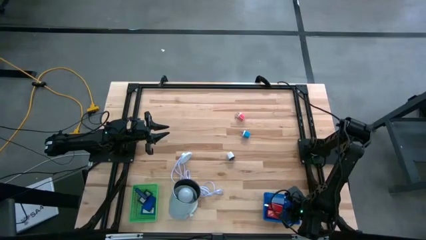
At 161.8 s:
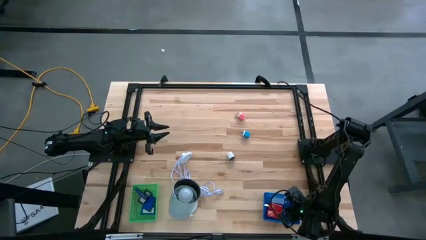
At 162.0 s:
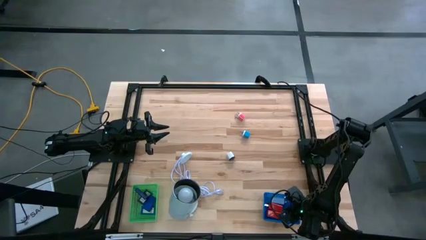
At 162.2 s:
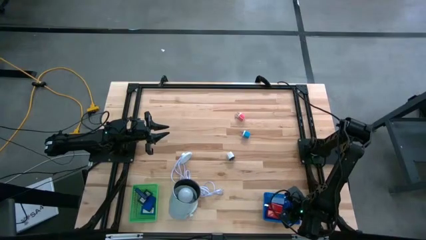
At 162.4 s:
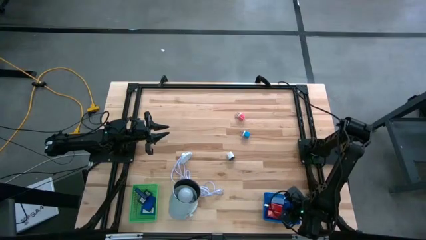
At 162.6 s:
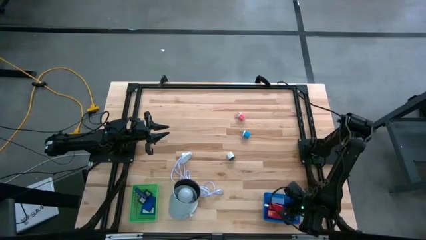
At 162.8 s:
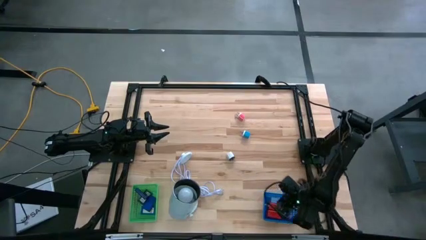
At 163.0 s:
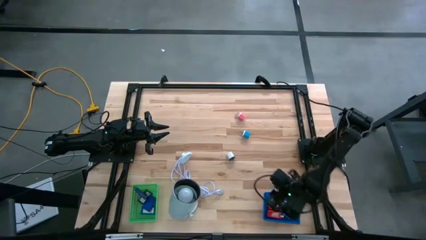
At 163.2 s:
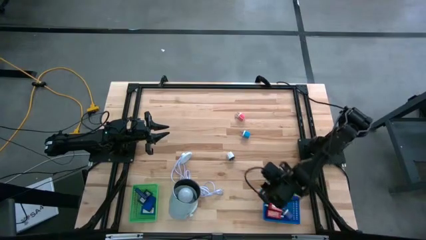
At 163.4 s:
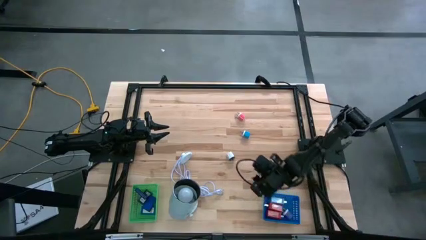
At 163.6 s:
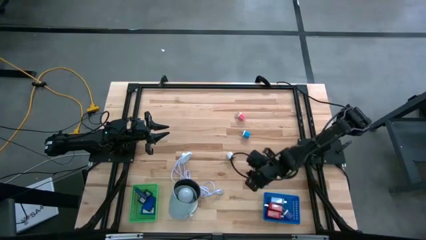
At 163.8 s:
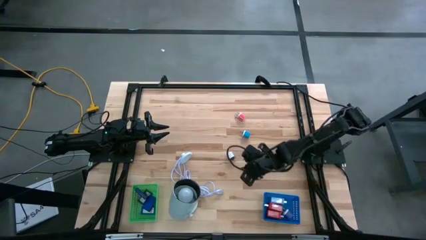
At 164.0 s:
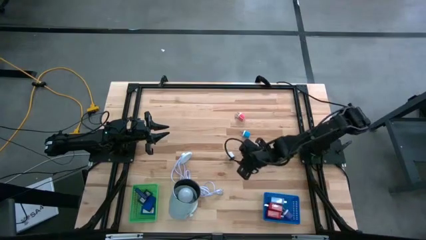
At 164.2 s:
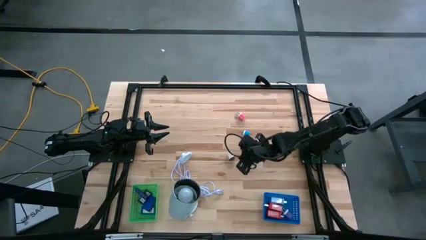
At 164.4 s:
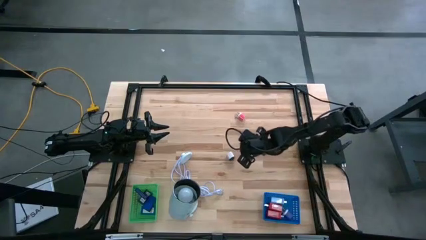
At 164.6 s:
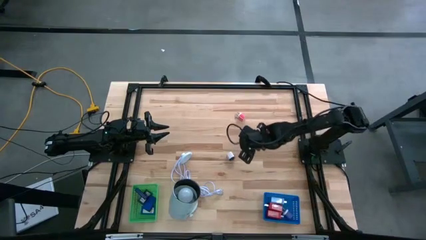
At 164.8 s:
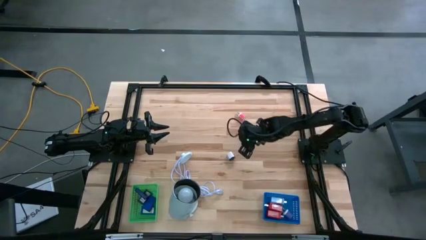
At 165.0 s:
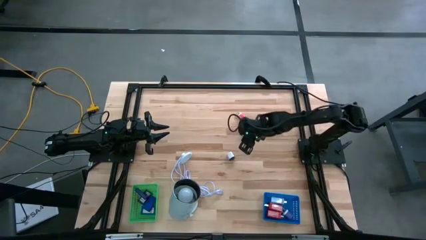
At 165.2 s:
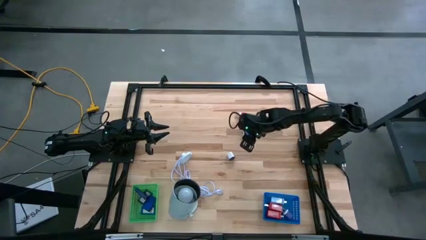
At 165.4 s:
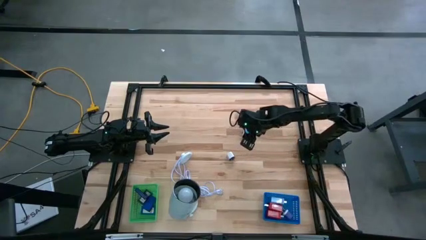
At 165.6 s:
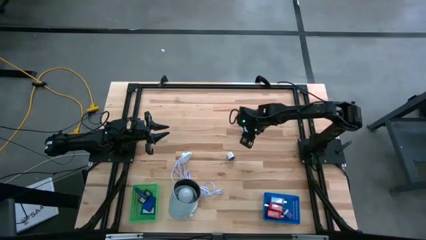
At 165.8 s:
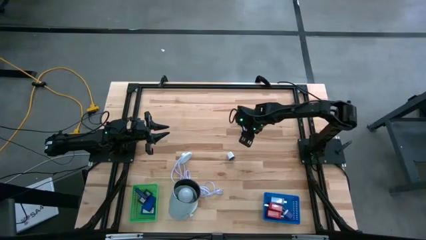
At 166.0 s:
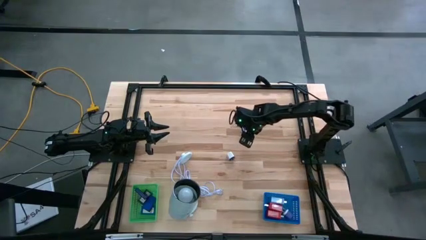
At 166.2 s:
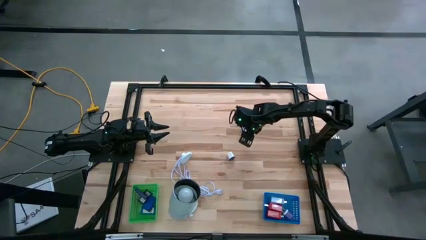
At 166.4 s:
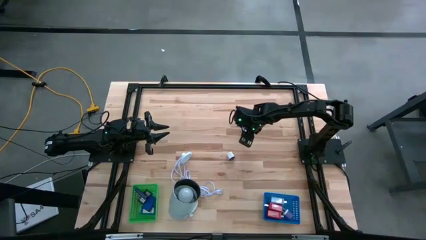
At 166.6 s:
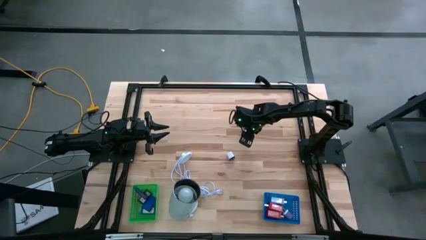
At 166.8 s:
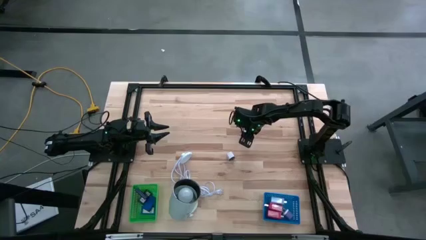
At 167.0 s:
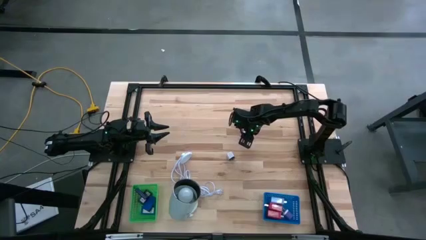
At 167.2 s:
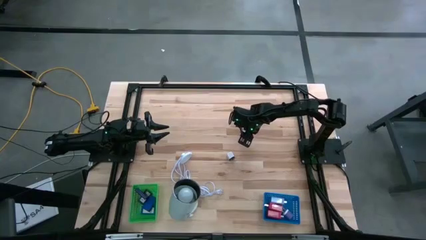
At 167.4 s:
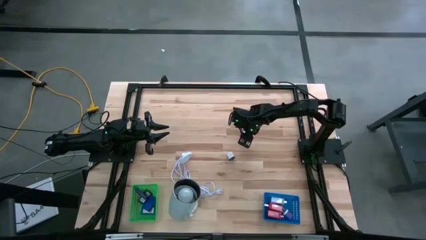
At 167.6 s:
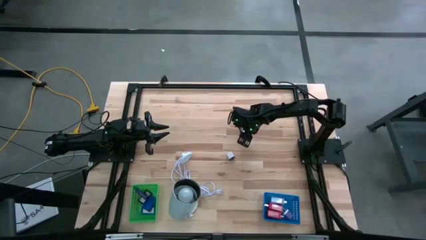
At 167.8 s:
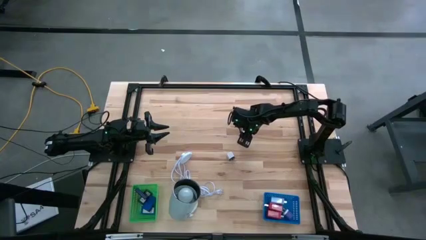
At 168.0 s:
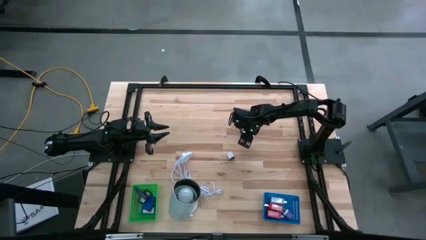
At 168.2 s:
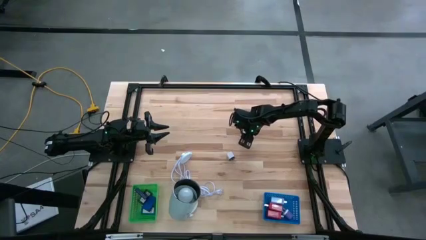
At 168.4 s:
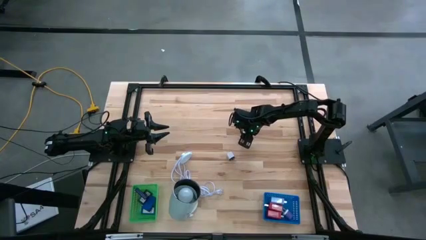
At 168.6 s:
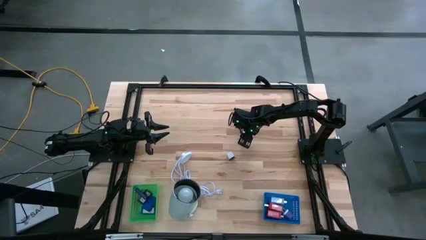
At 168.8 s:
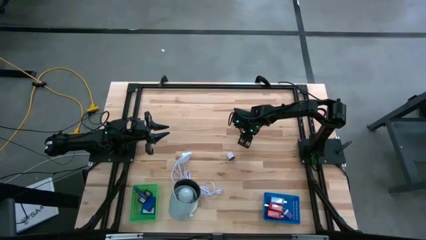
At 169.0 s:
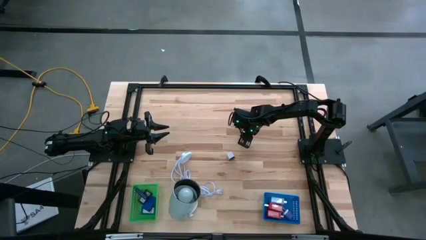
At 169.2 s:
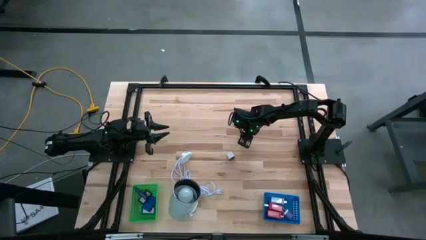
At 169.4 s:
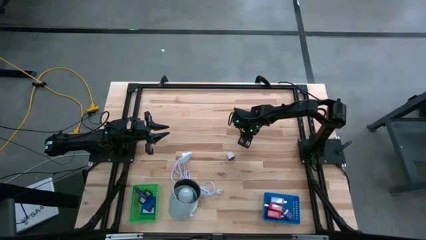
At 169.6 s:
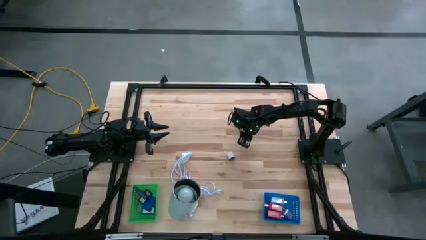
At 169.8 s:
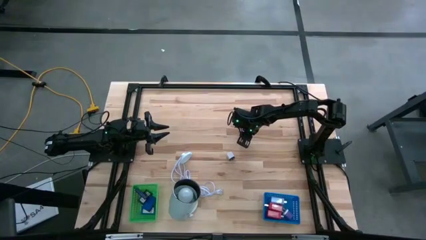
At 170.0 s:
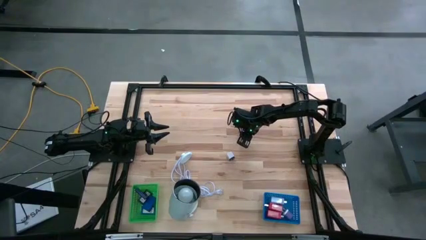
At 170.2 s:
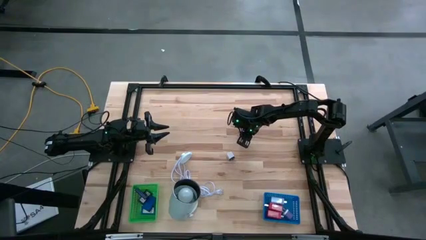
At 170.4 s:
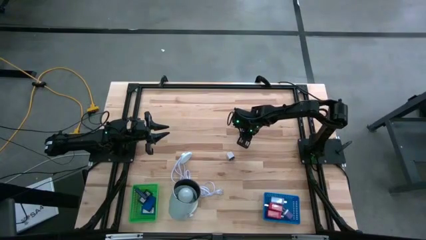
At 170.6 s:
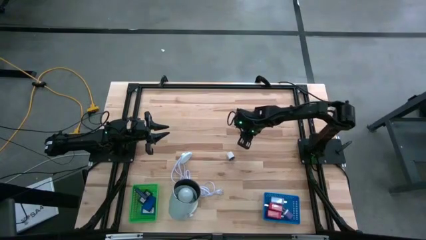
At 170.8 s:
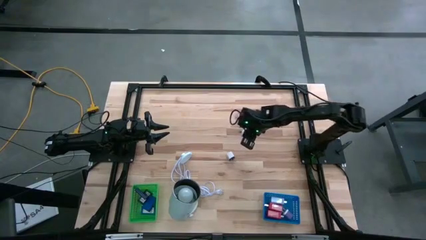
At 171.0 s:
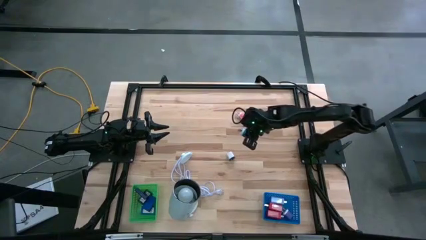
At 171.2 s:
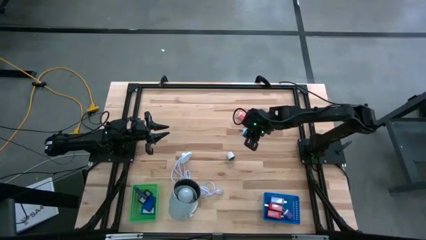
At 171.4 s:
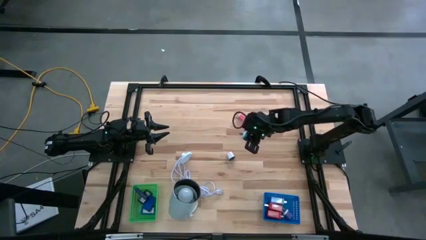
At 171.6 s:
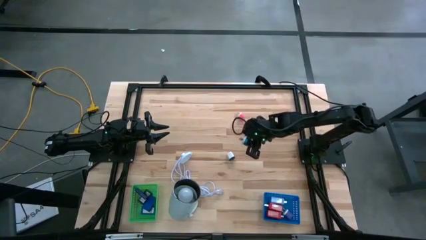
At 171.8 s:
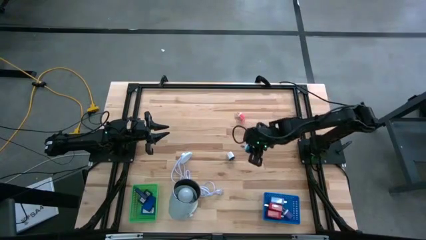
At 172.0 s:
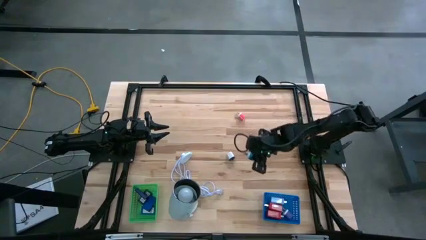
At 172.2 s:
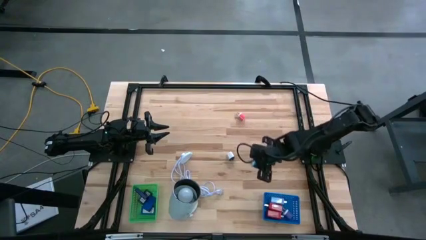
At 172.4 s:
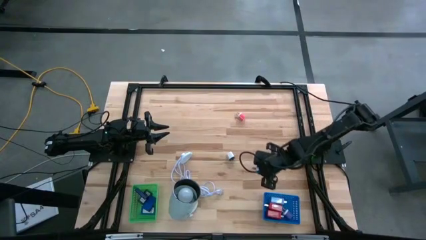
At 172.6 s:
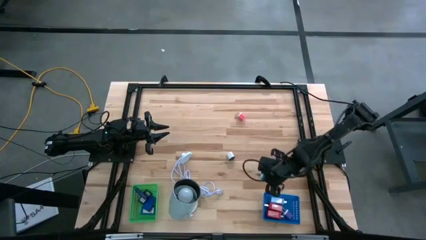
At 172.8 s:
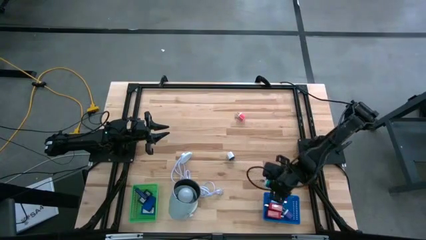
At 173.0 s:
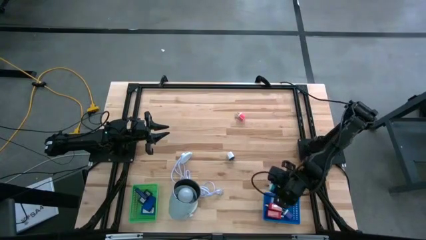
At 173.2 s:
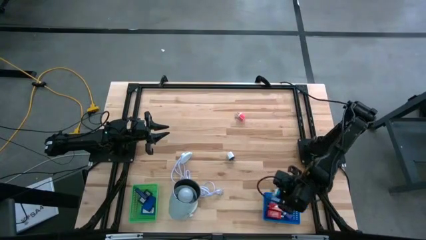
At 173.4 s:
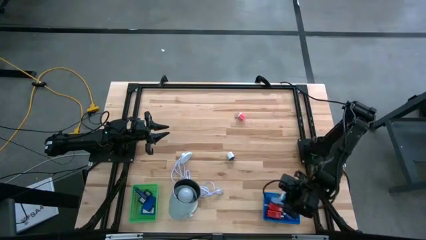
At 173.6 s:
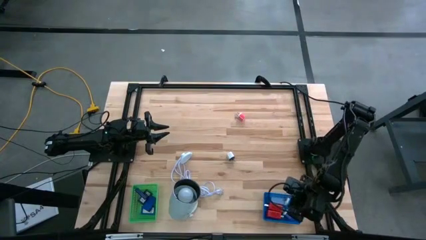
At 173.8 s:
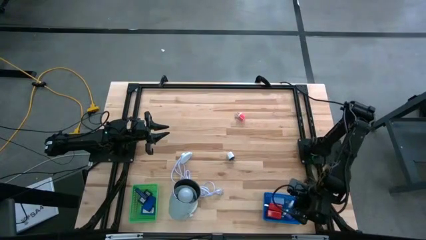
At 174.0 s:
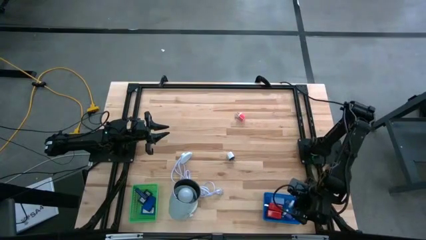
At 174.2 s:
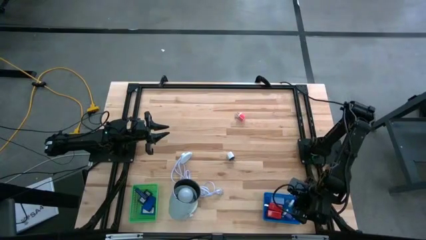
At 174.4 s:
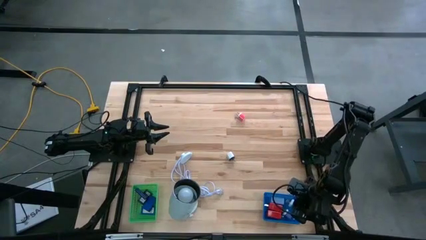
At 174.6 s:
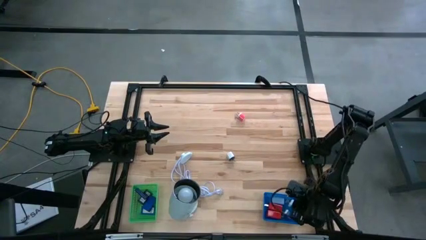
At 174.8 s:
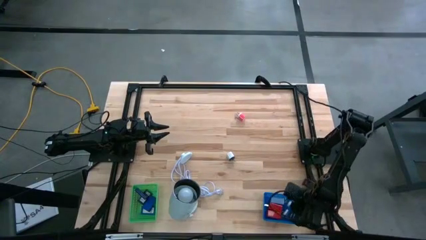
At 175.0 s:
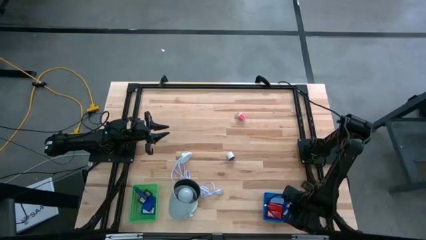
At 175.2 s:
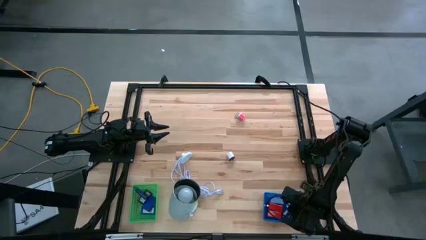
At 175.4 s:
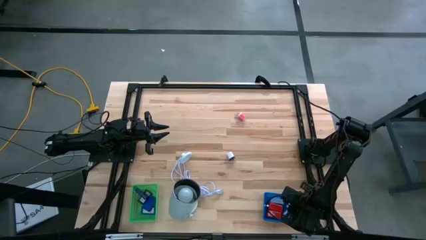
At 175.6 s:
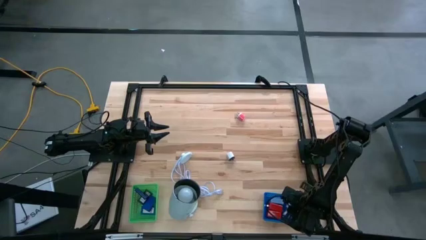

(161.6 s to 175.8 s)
Task: Pick & Place Office items
Put the blue charger adapter into the blue basket

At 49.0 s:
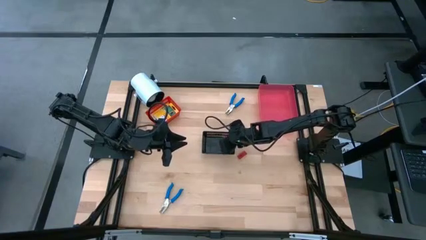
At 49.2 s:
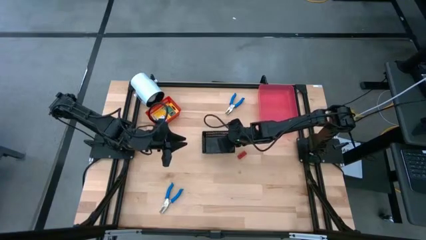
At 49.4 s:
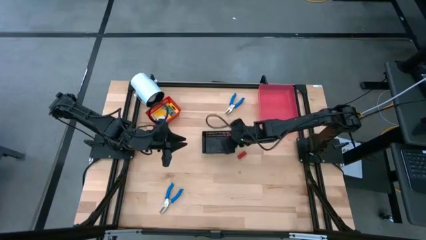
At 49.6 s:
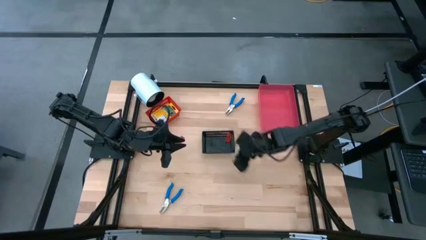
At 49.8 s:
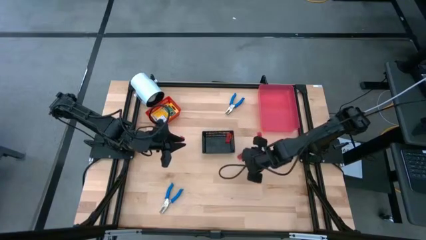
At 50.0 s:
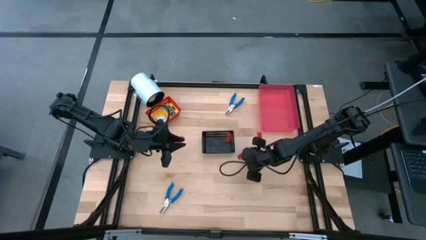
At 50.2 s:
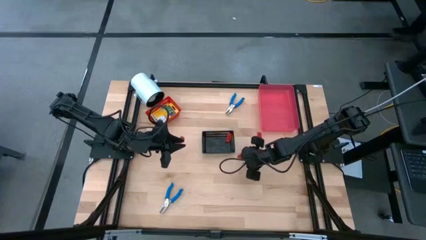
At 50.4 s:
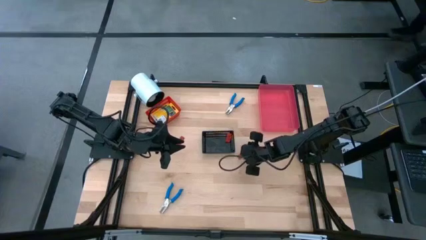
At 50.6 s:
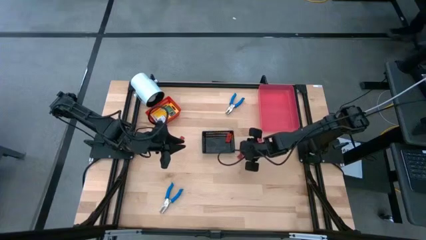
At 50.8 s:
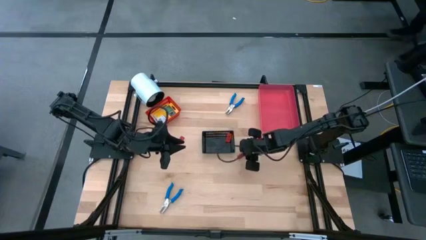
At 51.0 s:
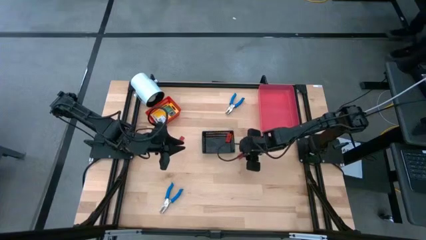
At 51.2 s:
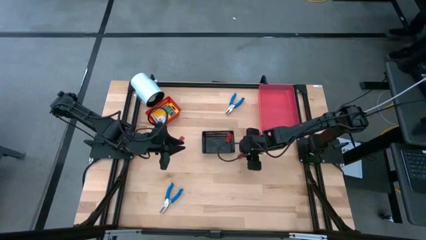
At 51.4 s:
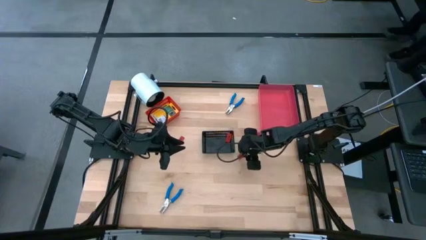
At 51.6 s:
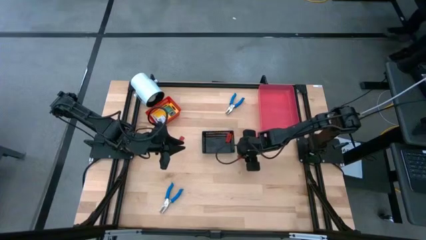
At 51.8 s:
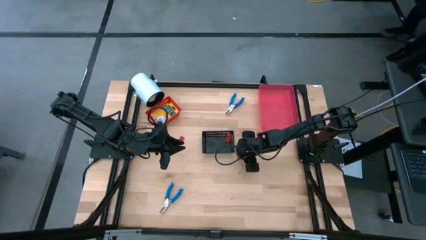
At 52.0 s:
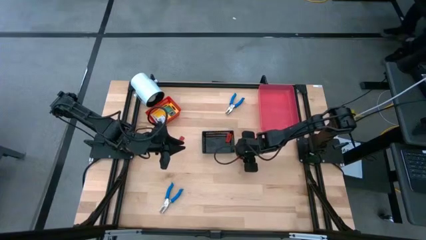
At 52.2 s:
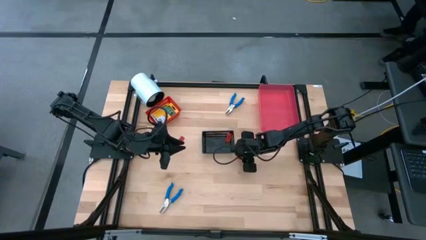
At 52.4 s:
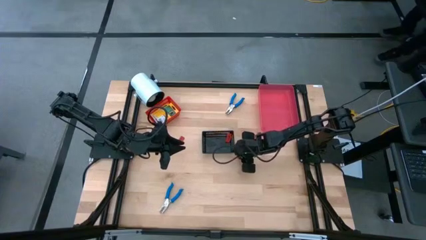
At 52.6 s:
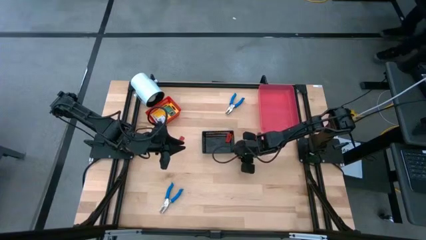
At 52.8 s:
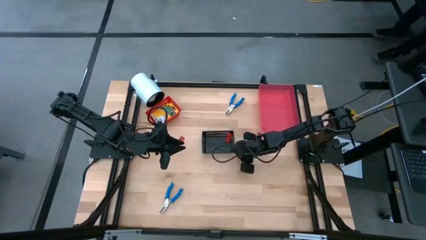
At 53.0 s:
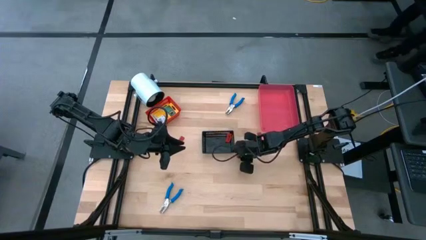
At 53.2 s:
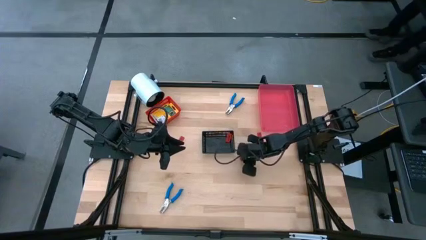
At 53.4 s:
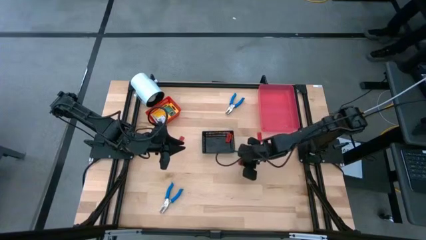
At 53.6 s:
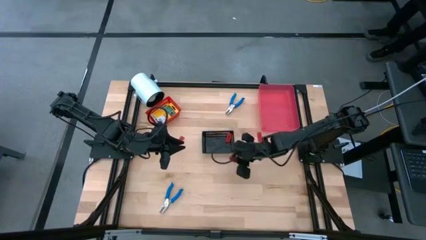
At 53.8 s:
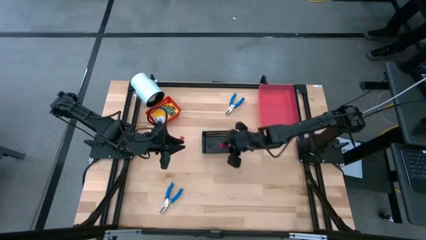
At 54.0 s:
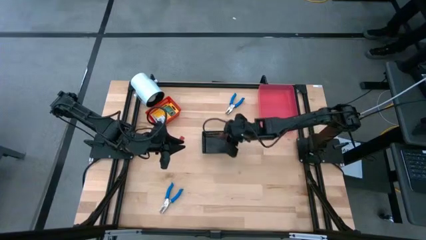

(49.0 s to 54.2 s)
Task: Pick & Place School Supplies
Put the red eraser into the black bin
